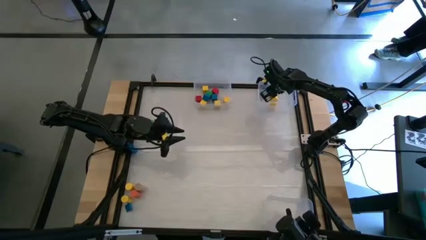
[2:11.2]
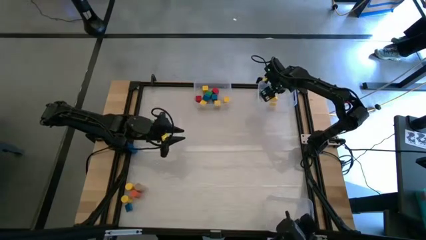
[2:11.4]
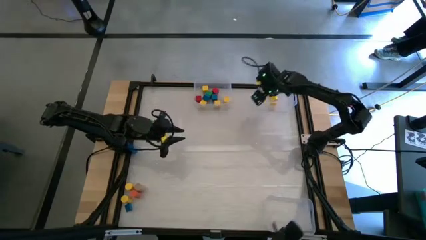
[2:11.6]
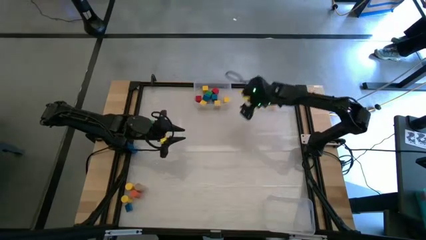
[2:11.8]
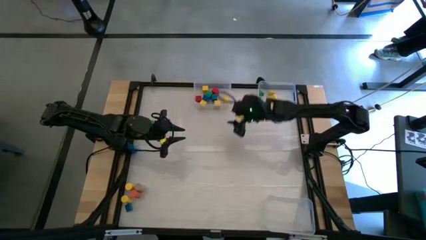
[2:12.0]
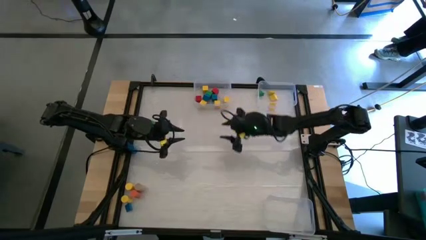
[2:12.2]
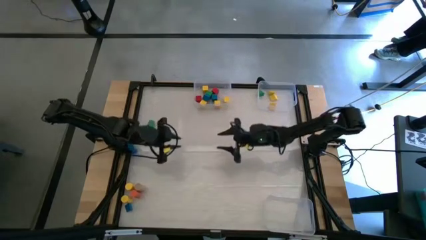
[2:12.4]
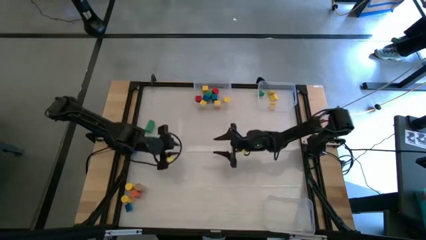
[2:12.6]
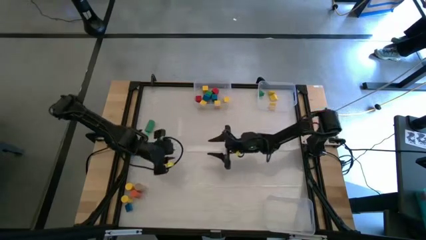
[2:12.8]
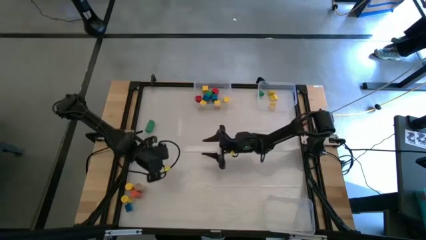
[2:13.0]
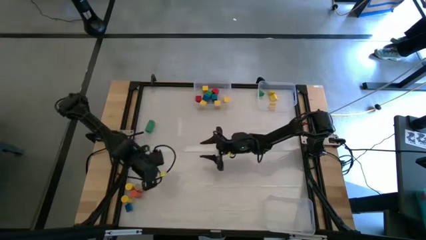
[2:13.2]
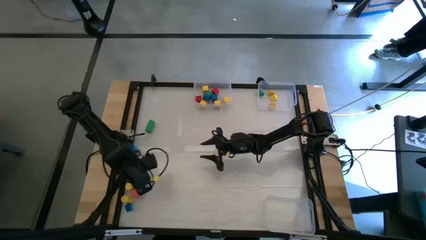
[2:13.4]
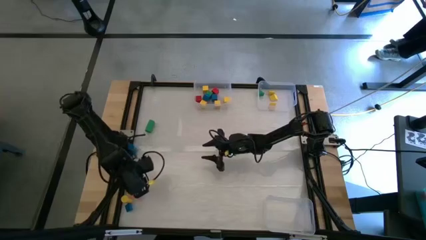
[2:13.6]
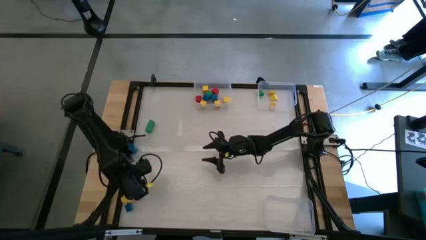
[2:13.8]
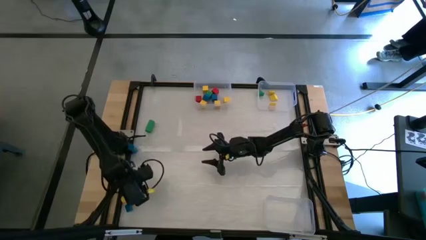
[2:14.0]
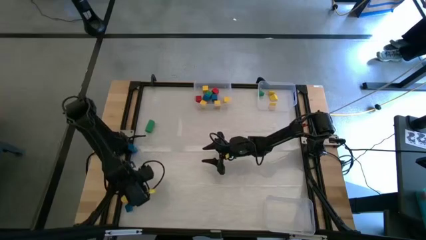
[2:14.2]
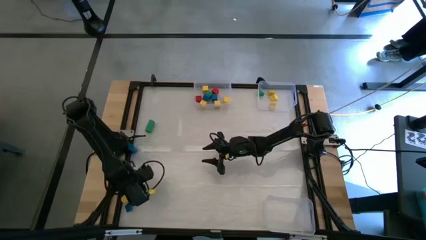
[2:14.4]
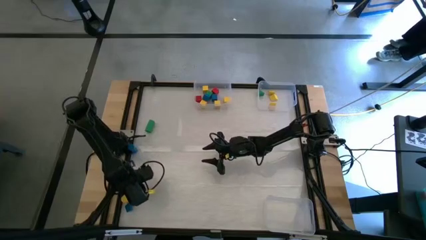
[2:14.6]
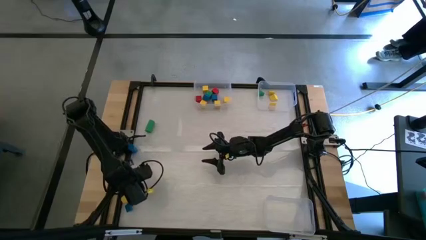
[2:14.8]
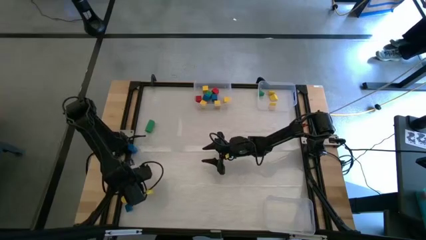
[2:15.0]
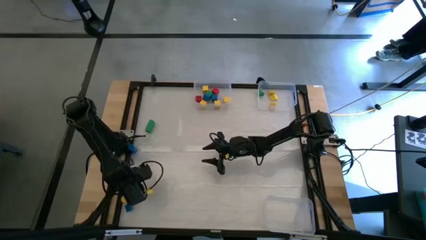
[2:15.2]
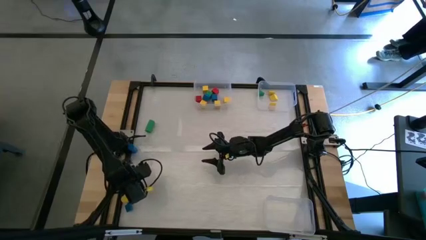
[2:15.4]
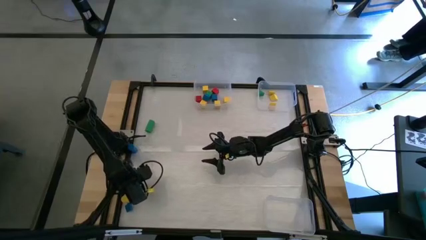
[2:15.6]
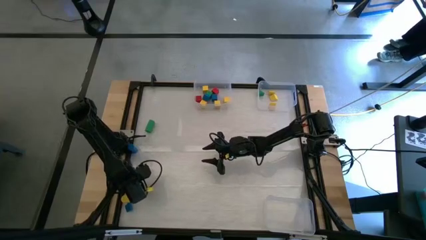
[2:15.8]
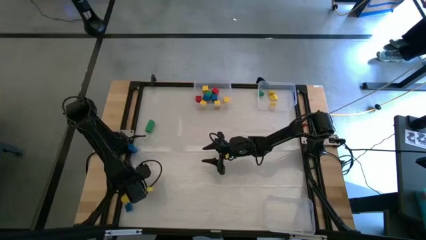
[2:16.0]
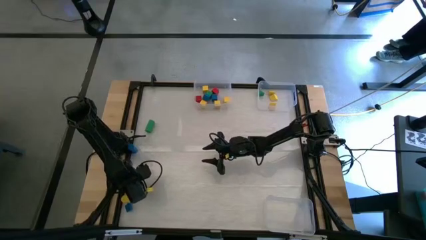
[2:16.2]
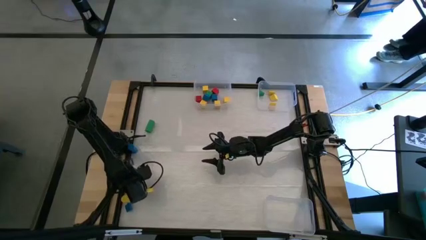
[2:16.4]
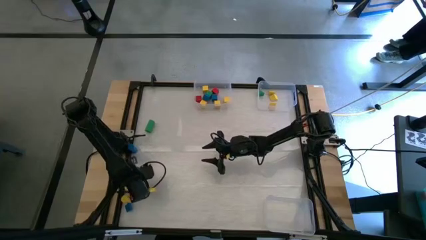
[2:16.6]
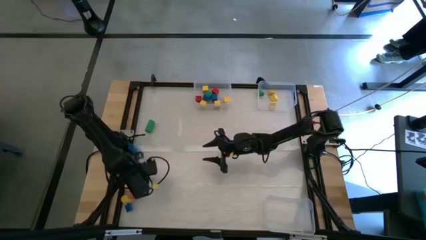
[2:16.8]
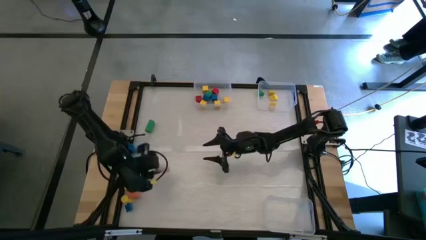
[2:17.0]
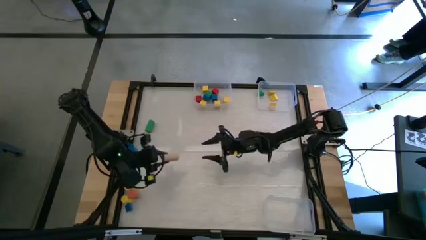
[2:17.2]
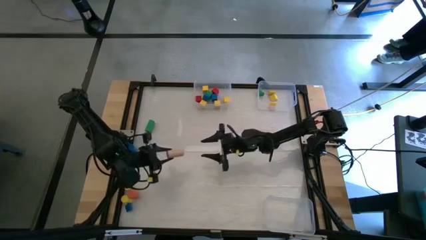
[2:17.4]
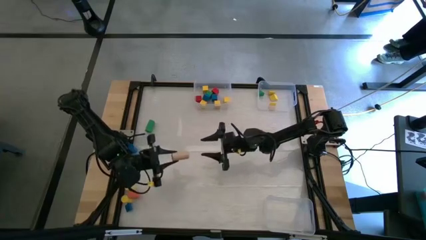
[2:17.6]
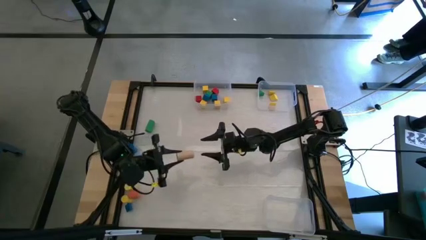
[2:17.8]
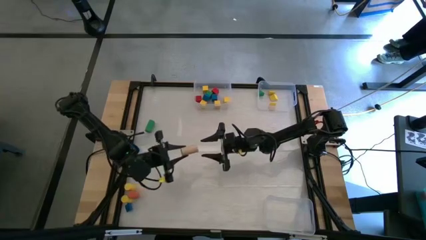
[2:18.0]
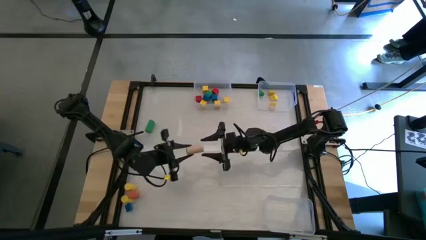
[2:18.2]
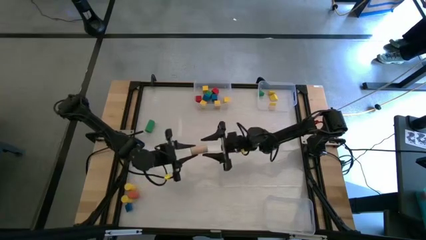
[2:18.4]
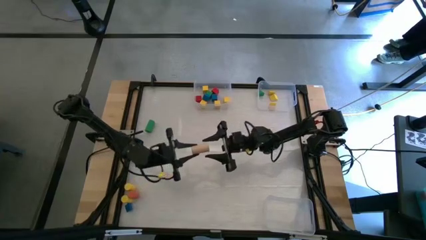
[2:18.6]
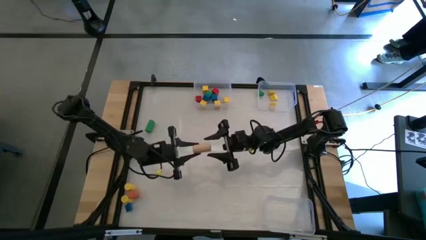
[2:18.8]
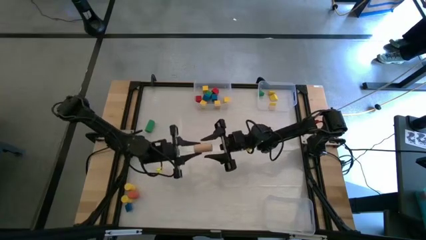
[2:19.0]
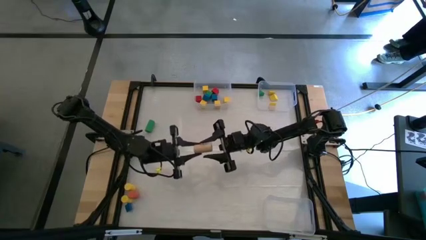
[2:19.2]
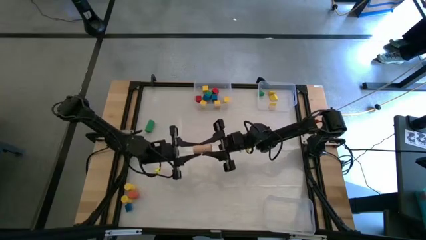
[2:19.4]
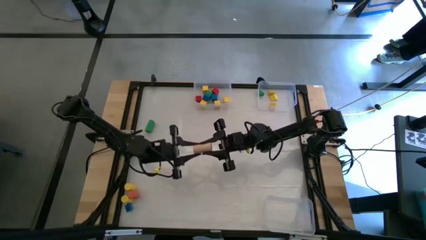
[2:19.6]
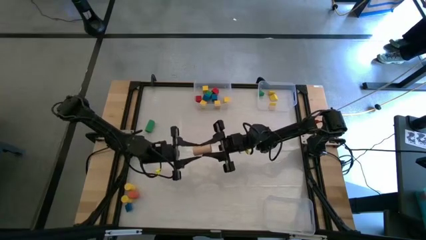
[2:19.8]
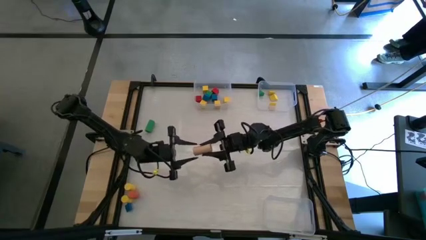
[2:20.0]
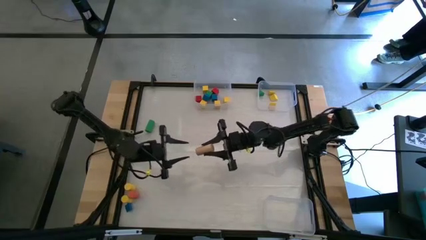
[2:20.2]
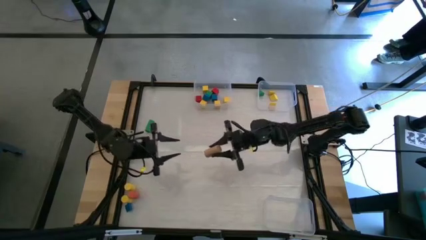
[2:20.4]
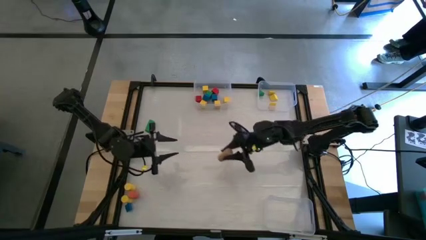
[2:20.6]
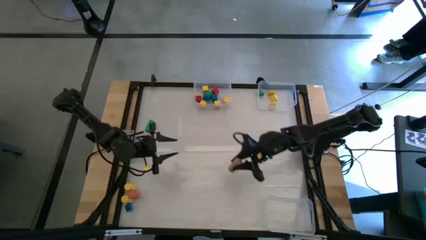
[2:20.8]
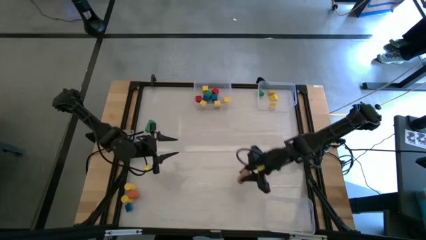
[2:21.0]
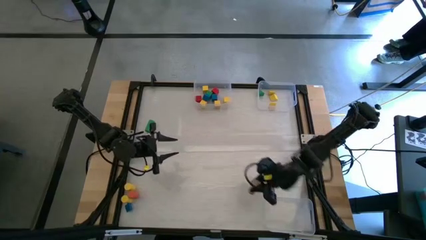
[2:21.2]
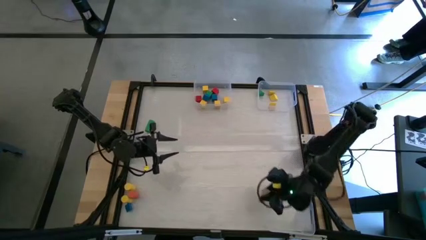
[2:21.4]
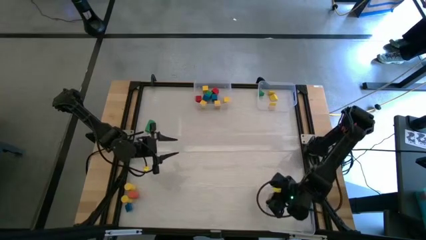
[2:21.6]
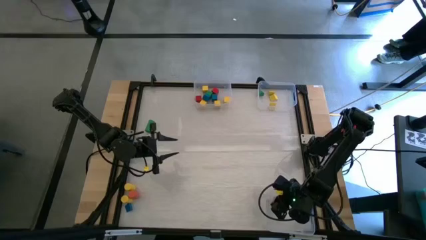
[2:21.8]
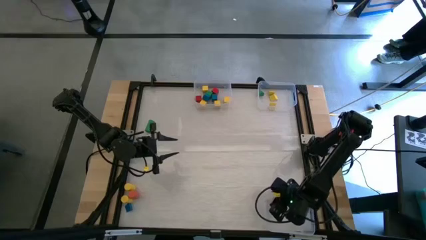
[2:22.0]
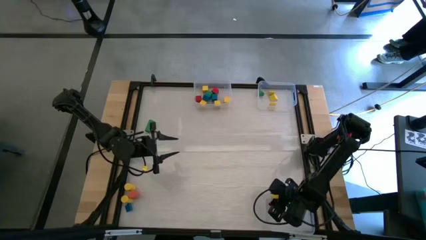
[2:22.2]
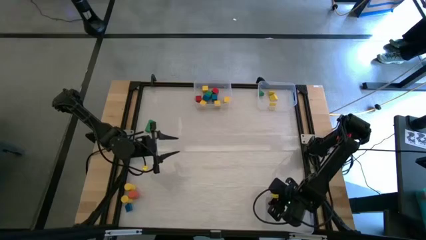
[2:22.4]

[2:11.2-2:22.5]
Task: Sort blocks by size
Put the cylinder brown block into the bottom right transparent bin

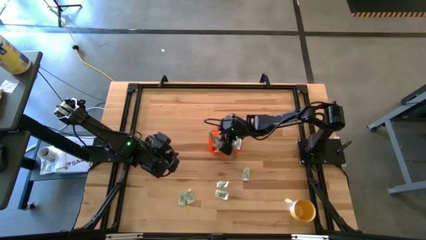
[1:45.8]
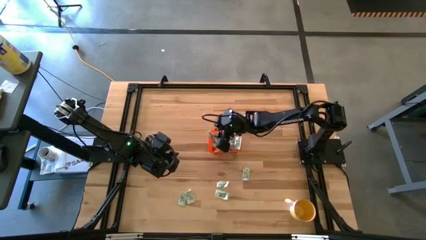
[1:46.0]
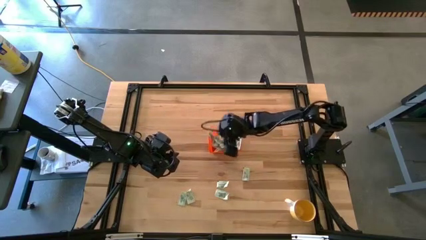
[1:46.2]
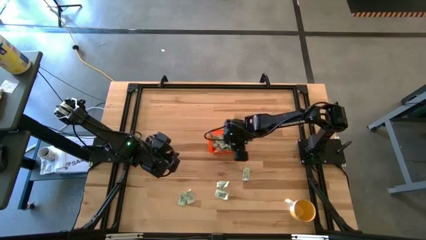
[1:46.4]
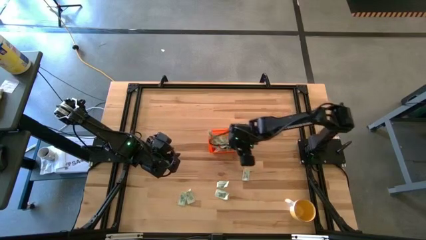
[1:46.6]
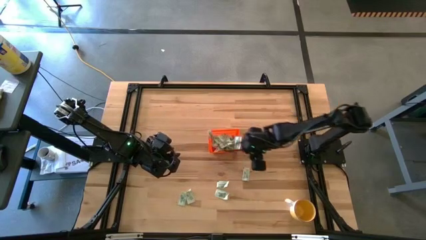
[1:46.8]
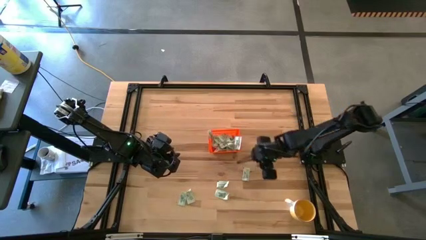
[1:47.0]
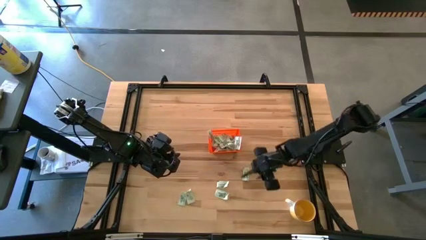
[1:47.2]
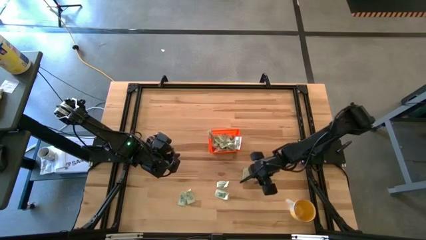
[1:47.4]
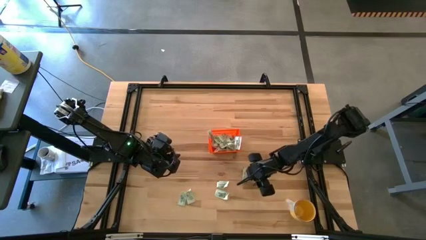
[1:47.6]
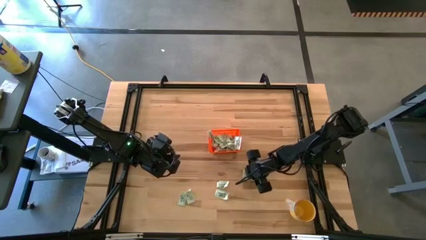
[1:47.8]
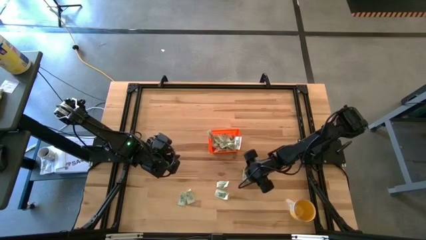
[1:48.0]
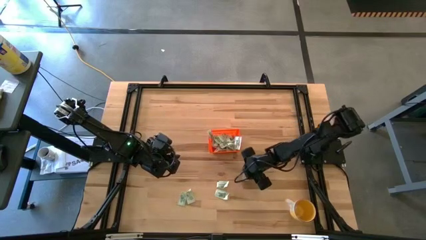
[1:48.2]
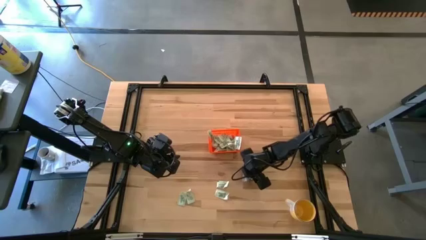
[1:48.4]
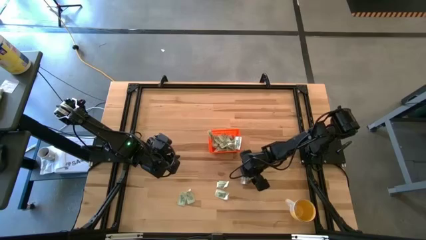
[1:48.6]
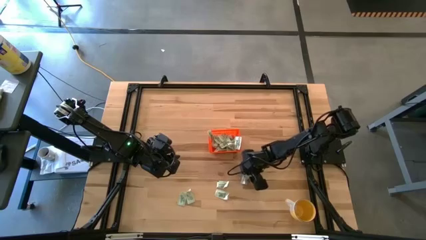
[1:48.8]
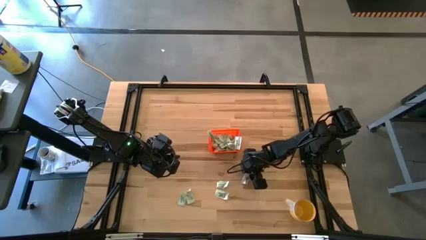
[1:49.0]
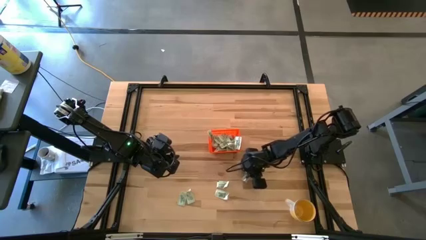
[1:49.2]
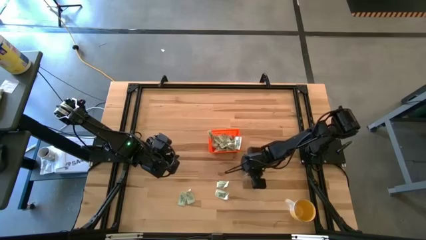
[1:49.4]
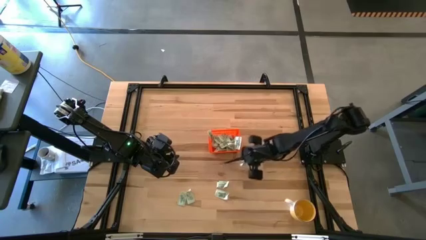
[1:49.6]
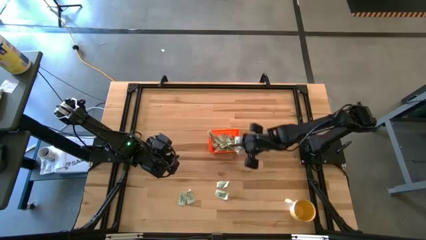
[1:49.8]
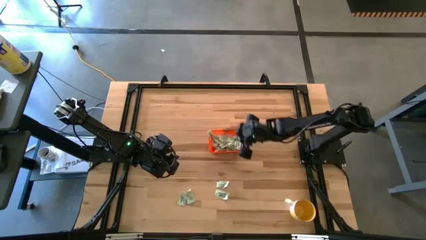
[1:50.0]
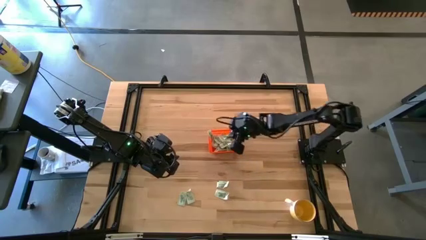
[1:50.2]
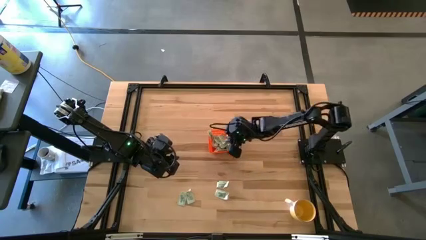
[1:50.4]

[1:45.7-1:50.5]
Task: Pick and place Stevia / Truvia into bins
Put the light green stevia packet into the orange basket
